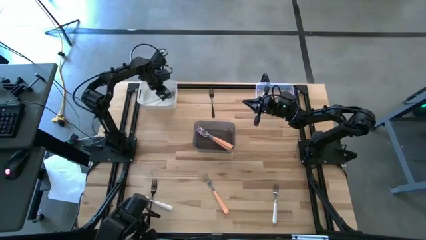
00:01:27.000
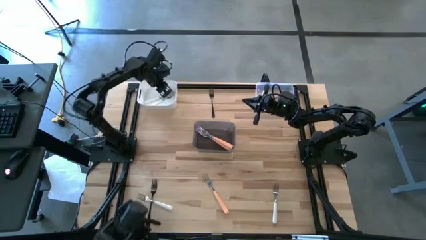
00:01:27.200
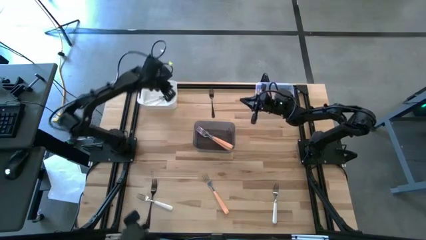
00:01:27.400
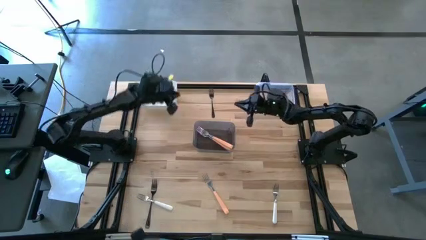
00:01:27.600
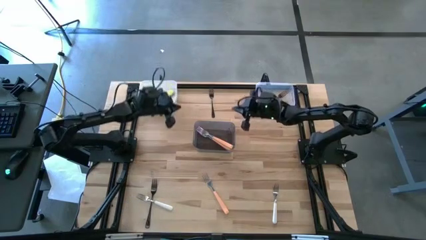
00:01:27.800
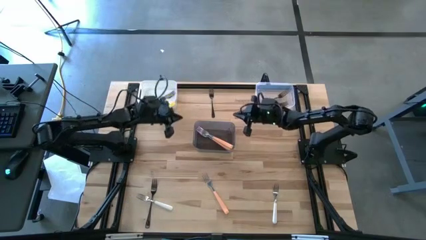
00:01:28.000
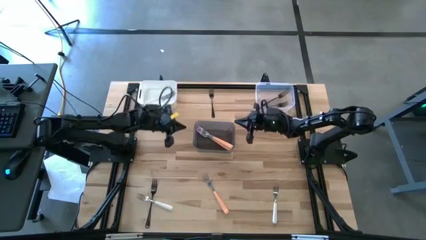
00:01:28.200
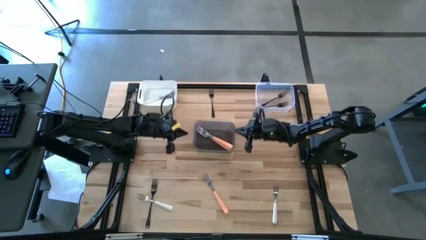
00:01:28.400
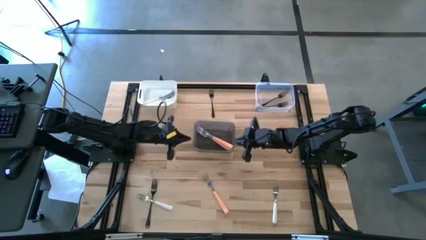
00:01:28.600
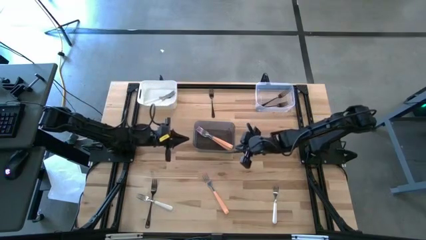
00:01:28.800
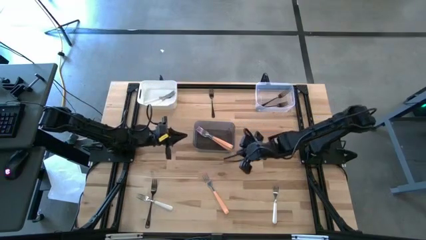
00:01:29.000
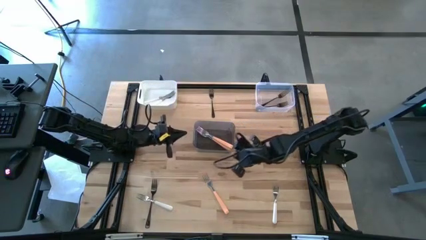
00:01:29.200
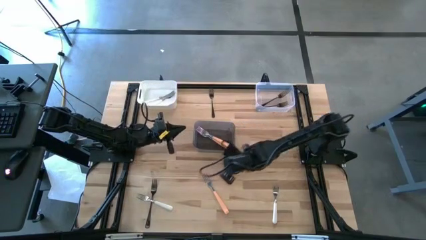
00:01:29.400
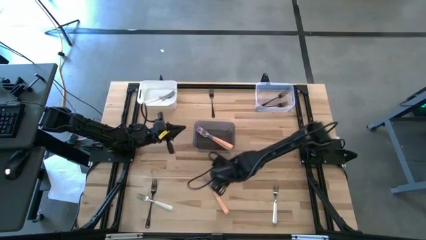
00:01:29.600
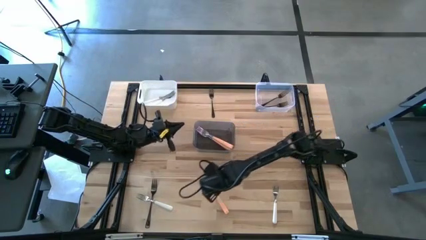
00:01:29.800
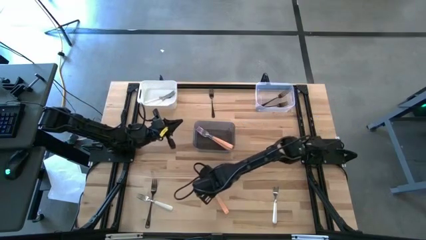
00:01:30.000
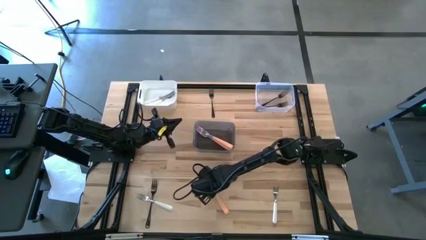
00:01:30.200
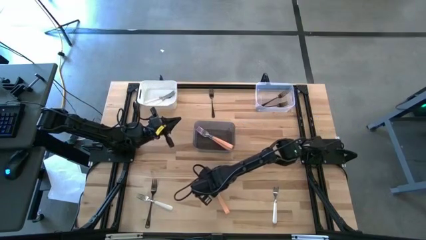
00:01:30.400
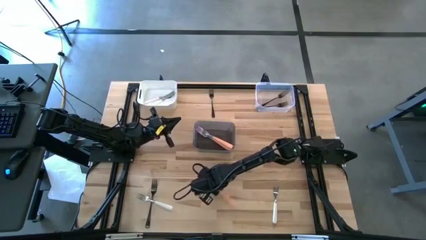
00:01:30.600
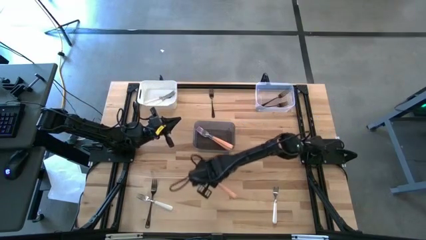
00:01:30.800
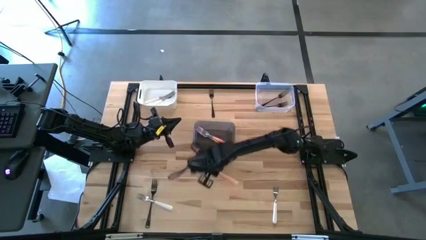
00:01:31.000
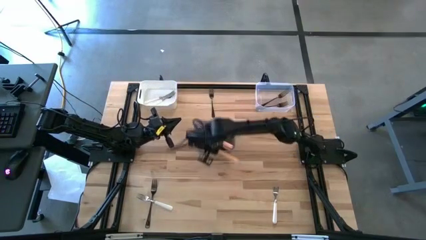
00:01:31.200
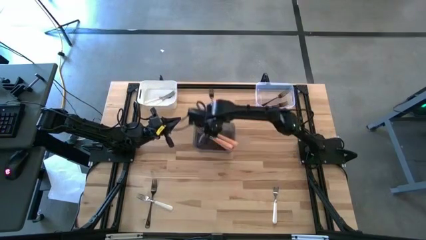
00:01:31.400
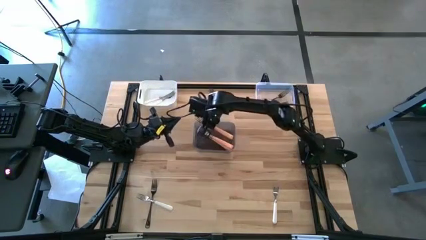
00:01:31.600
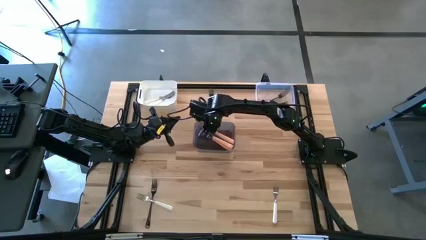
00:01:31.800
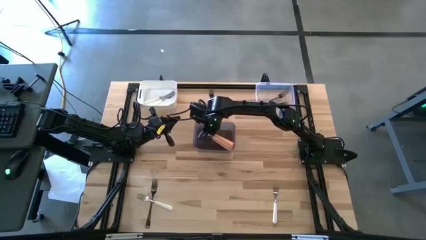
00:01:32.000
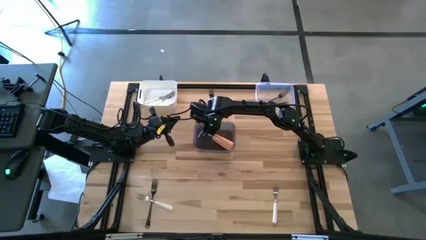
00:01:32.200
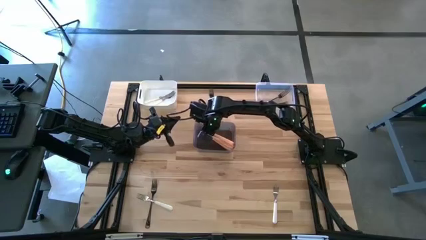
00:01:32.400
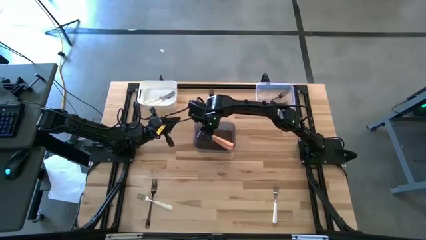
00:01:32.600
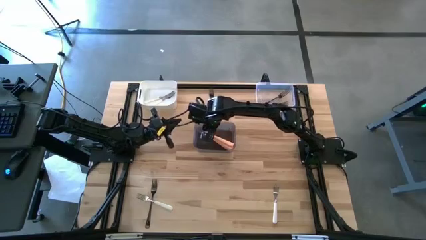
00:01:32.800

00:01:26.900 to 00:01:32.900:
Task: Sort silverware by color (type)
Put the orange fork into the black bin

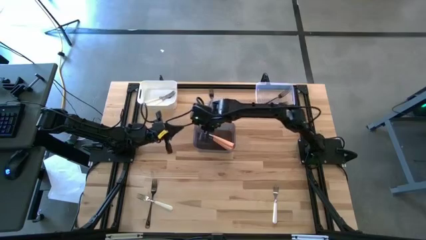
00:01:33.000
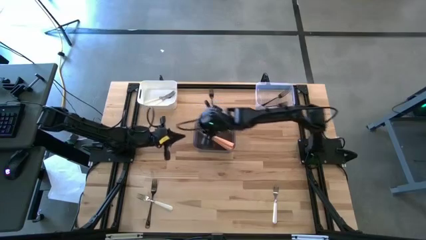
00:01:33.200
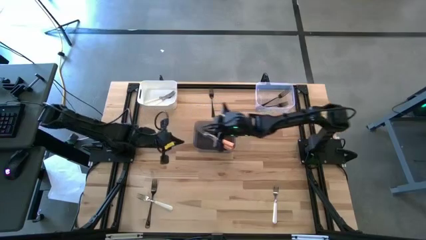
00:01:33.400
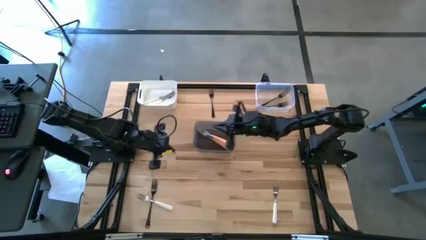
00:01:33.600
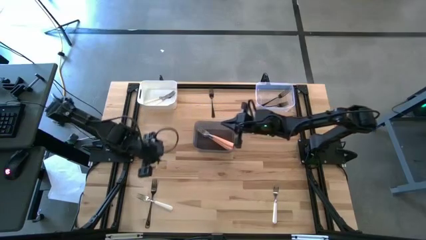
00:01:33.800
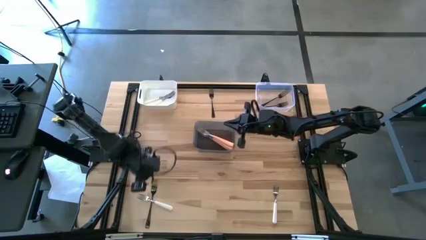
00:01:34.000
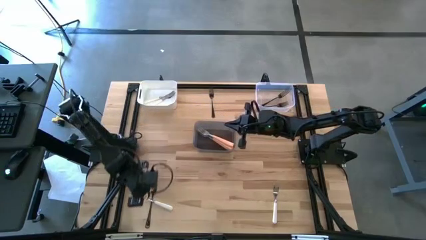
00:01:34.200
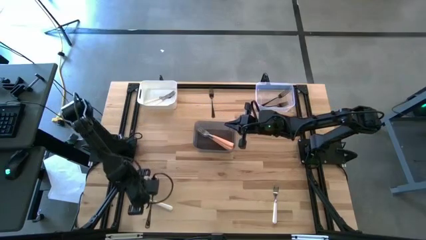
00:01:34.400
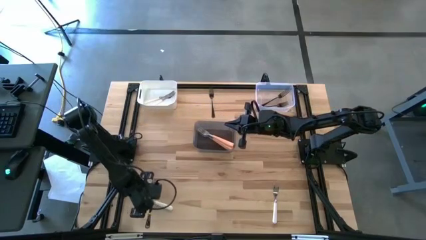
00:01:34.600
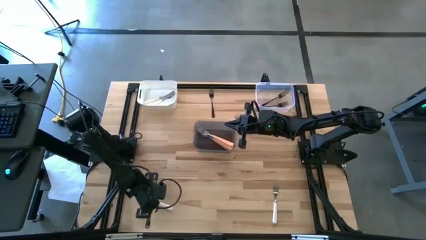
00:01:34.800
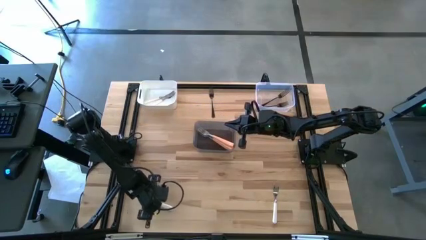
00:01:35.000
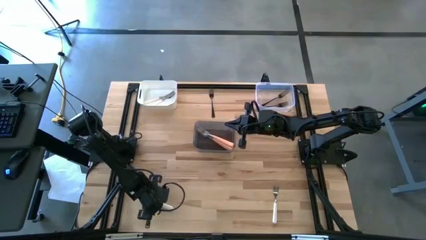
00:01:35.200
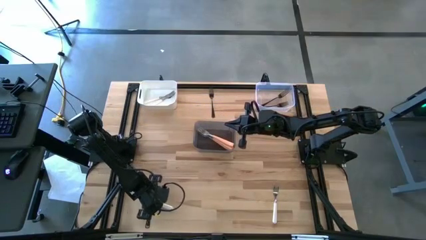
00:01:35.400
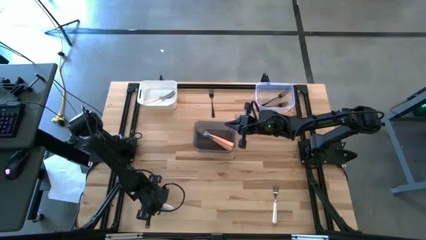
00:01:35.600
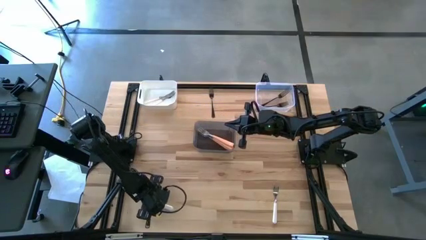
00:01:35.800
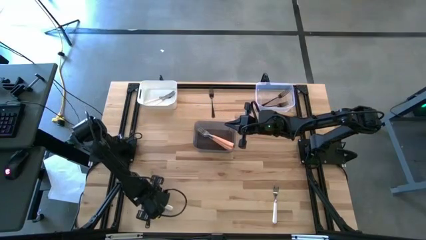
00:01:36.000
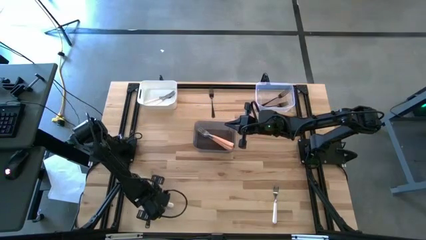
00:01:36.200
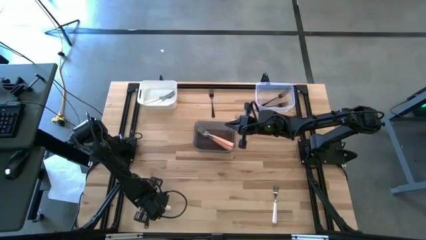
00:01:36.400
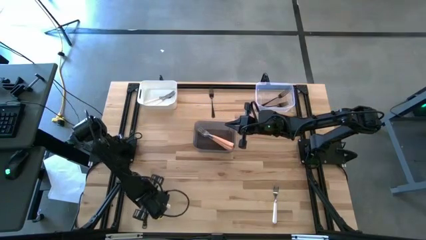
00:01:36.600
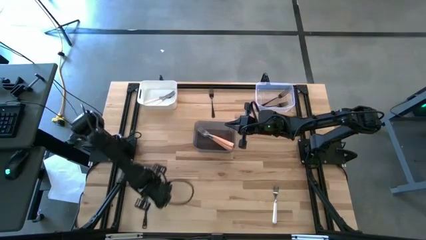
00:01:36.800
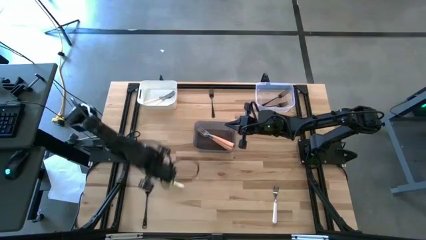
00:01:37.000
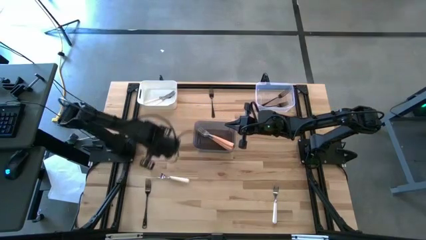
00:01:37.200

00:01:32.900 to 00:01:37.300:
Put the left white fork into the white bin

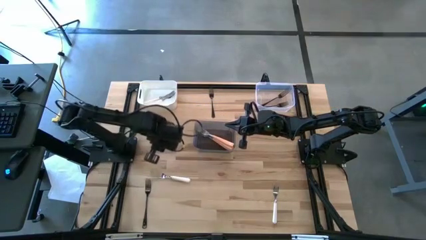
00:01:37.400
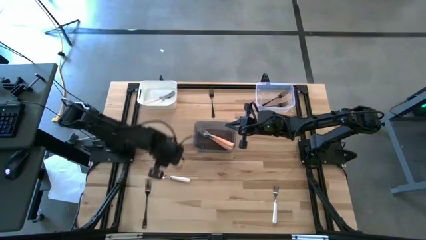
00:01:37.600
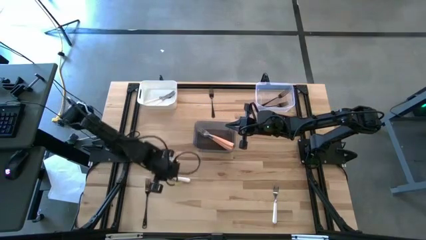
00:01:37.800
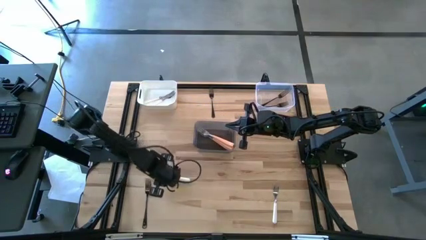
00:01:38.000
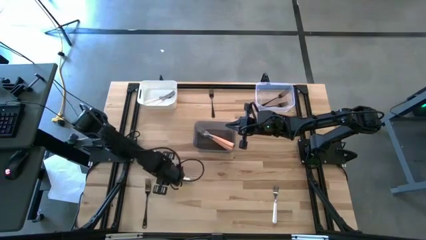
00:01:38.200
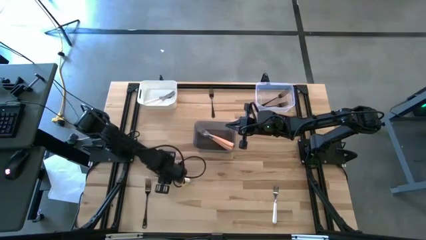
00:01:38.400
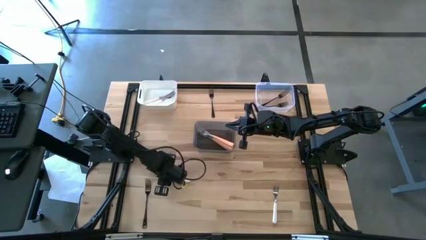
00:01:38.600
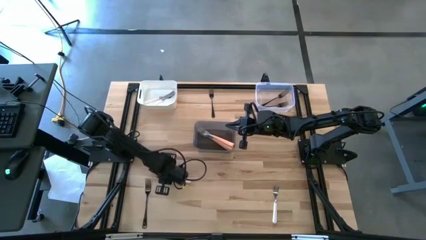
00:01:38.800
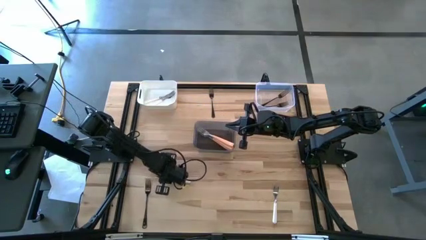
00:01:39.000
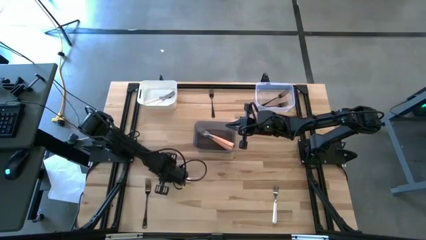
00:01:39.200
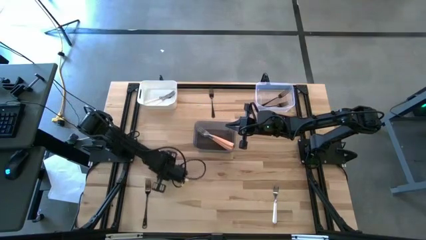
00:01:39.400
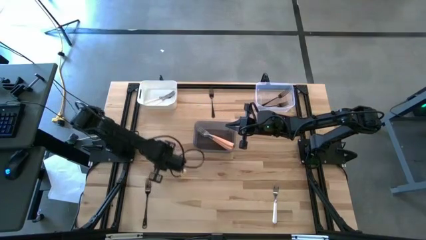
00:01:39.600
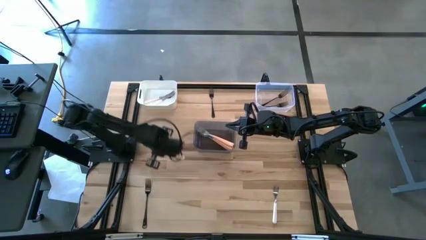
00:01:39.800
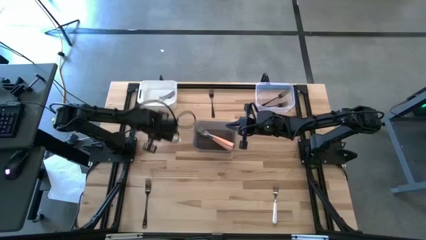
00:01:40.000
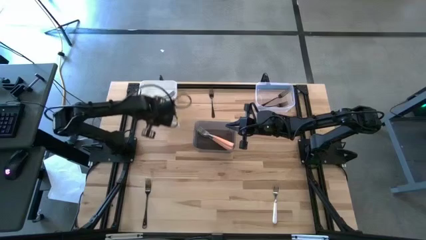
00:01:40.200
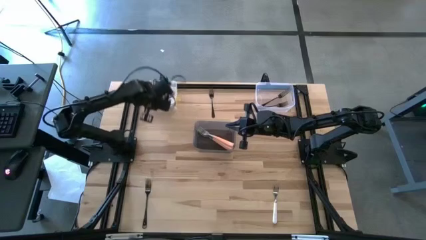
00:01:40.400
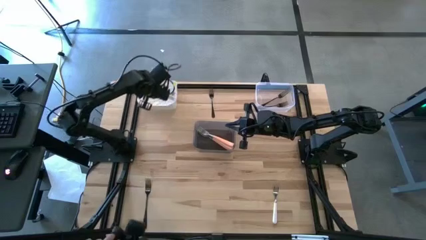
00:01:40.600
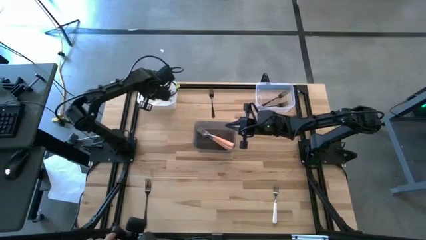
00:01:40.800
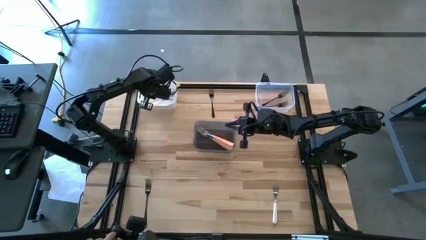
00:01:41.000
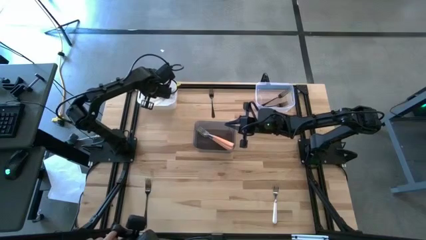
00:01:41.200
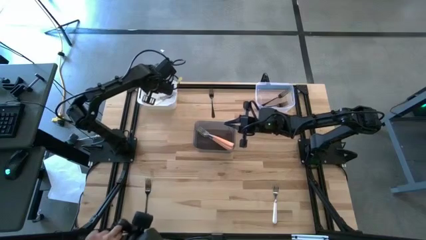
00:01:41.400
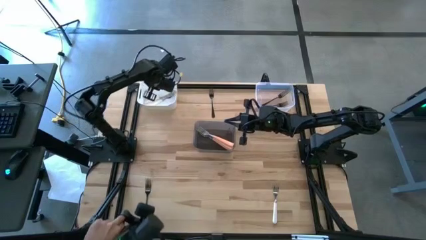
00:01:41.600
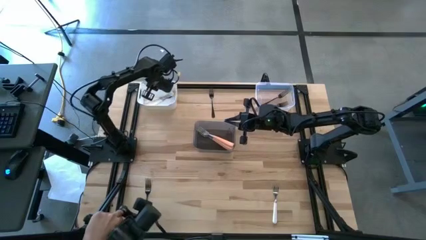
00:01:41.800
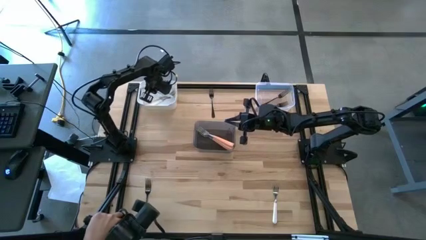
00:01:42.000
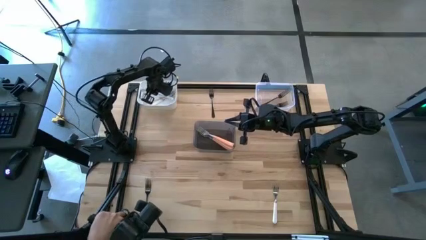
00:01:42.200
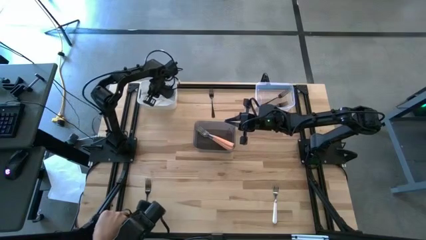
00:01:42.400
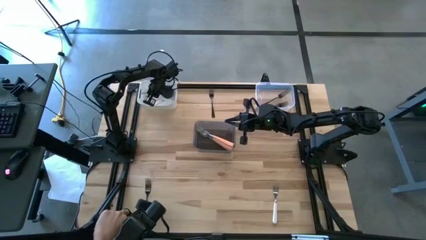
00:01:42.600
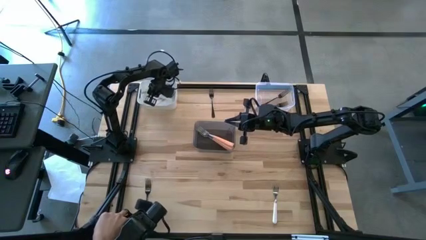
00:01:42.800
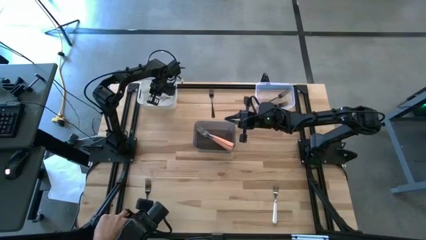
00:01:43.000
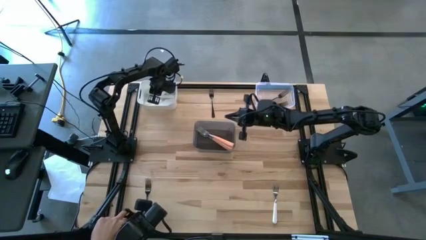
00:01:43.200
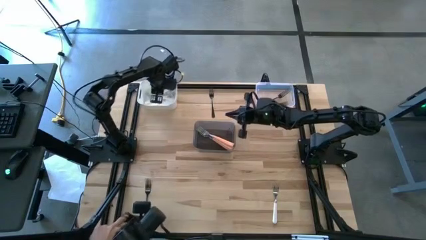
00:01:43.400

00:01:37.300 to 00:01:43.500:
Put the left white fork into the white bin
